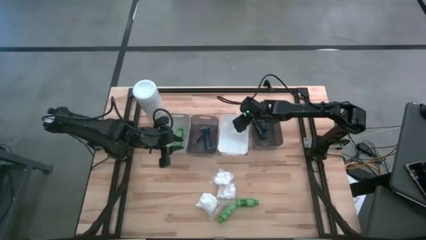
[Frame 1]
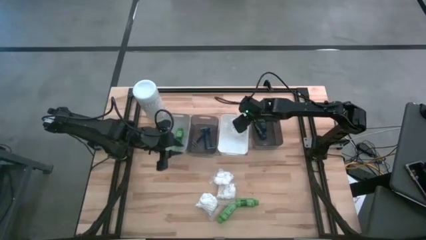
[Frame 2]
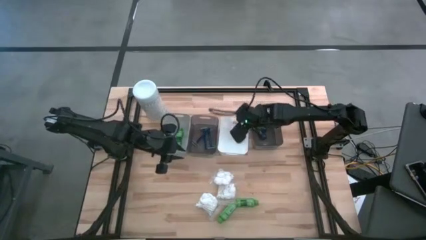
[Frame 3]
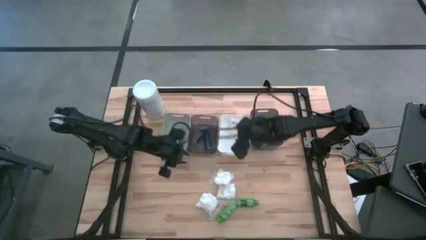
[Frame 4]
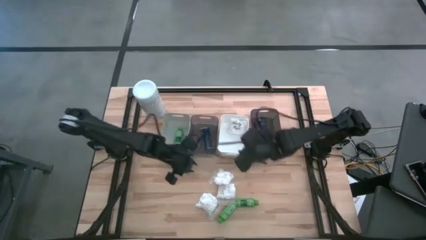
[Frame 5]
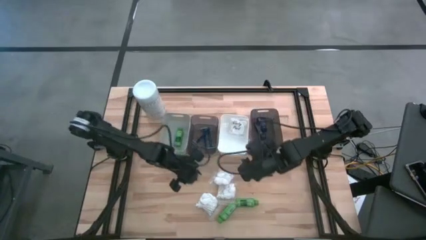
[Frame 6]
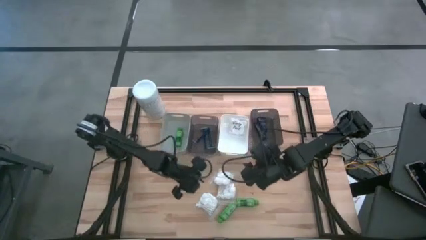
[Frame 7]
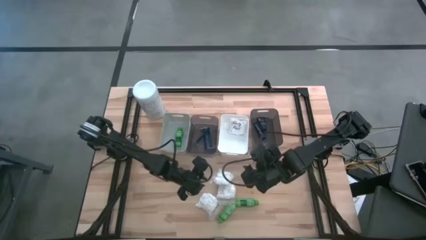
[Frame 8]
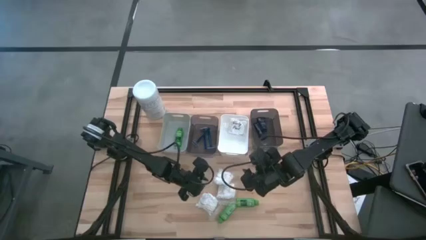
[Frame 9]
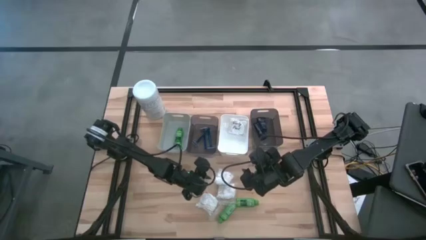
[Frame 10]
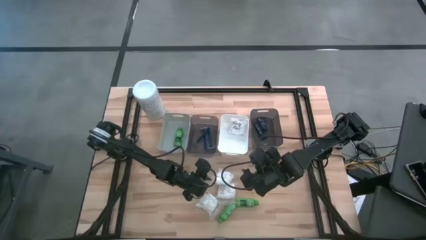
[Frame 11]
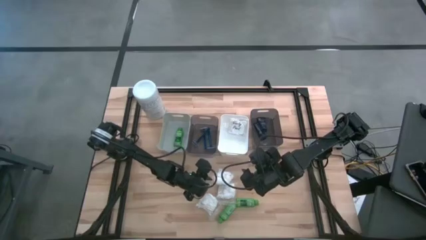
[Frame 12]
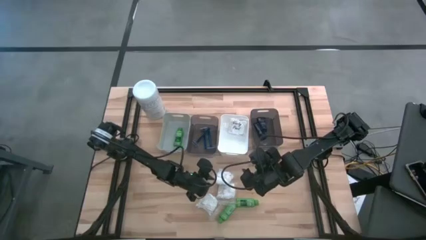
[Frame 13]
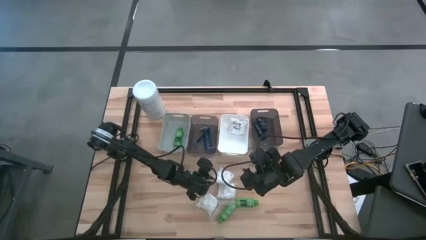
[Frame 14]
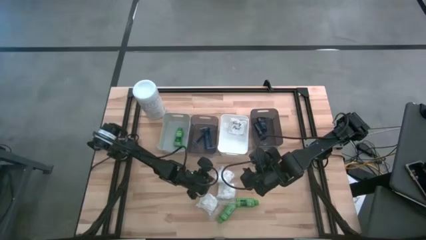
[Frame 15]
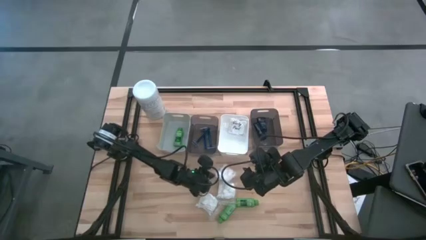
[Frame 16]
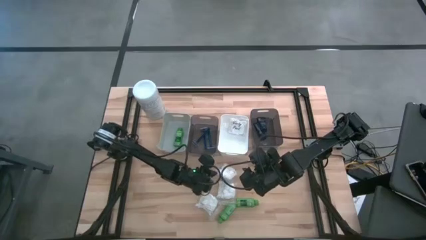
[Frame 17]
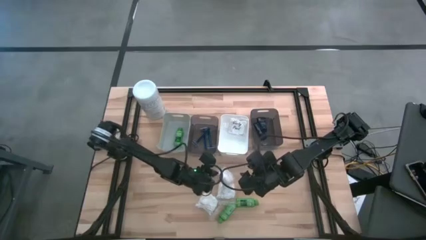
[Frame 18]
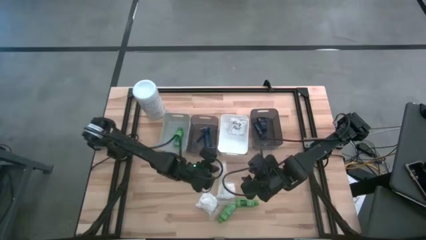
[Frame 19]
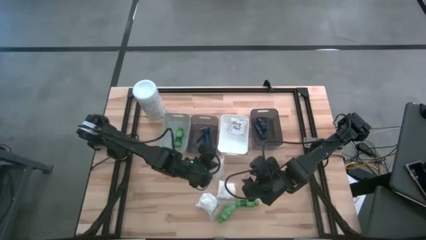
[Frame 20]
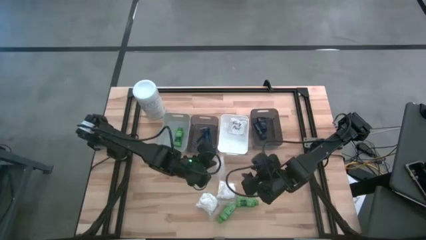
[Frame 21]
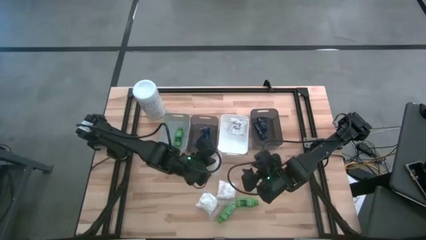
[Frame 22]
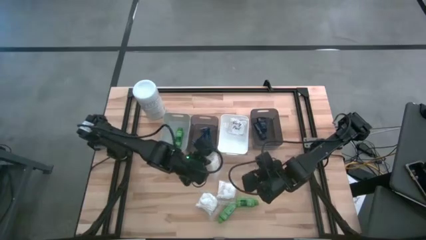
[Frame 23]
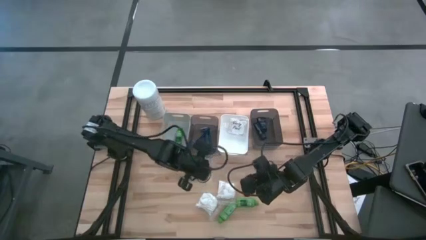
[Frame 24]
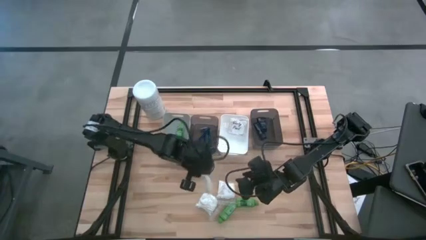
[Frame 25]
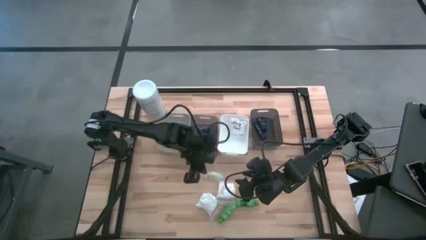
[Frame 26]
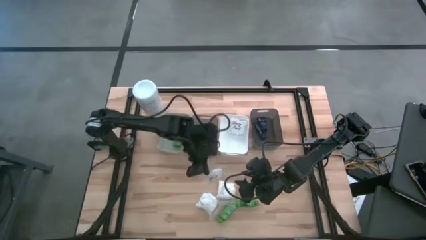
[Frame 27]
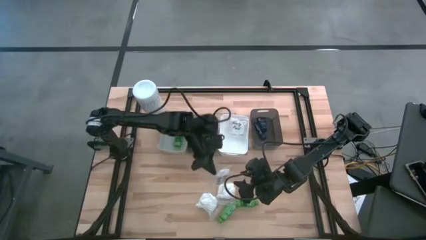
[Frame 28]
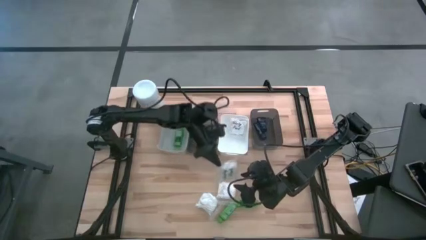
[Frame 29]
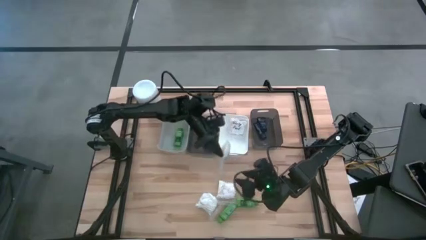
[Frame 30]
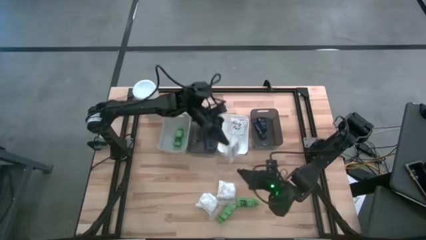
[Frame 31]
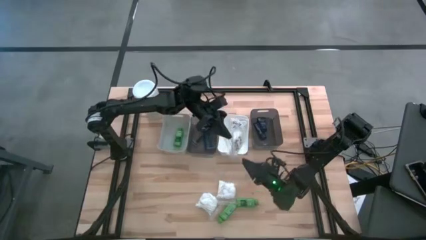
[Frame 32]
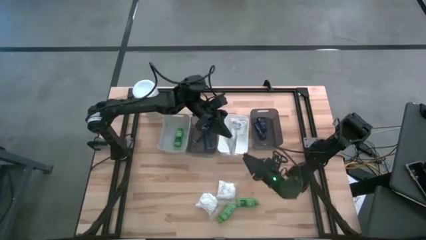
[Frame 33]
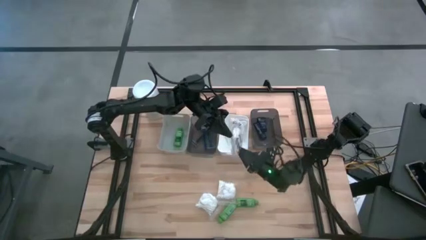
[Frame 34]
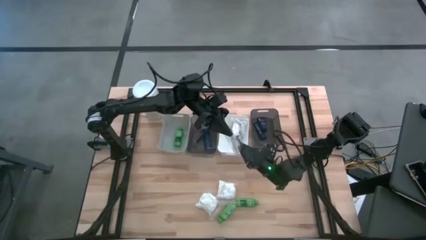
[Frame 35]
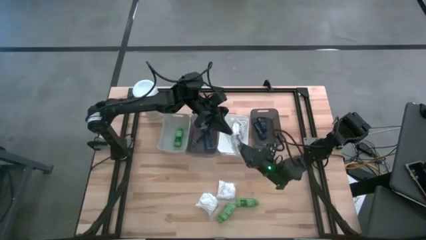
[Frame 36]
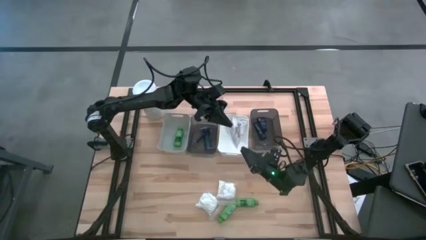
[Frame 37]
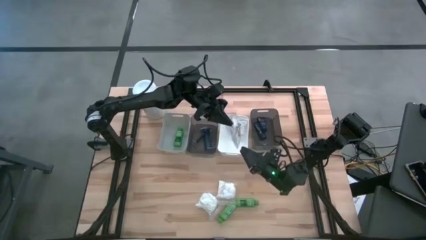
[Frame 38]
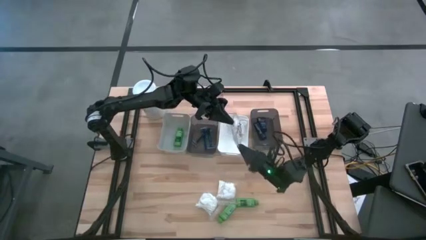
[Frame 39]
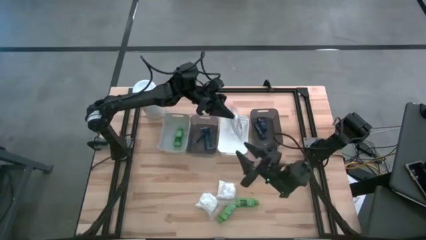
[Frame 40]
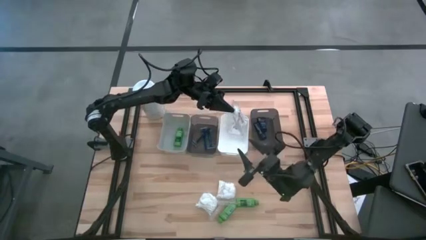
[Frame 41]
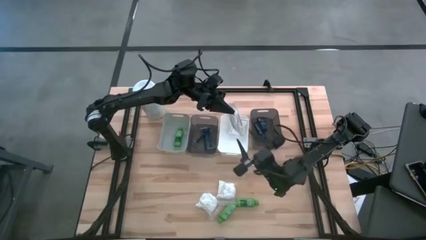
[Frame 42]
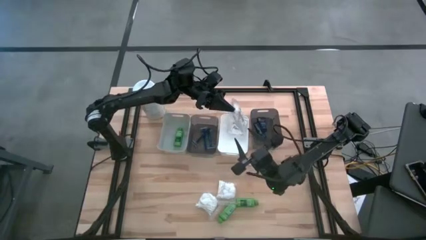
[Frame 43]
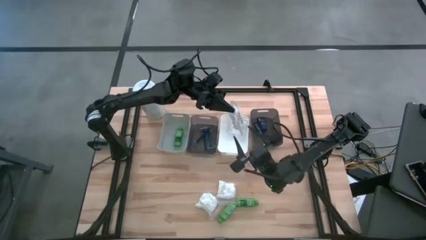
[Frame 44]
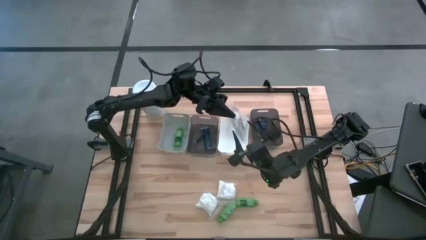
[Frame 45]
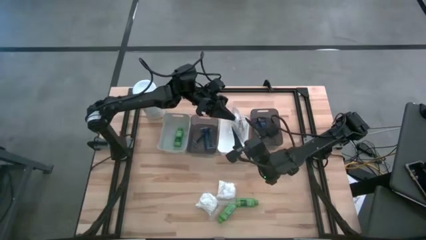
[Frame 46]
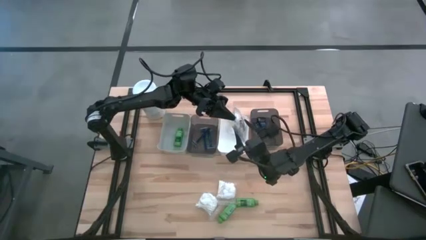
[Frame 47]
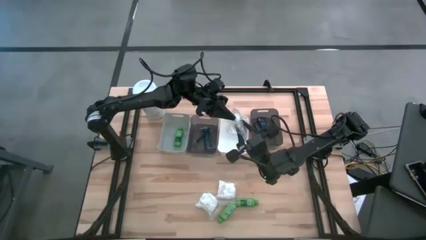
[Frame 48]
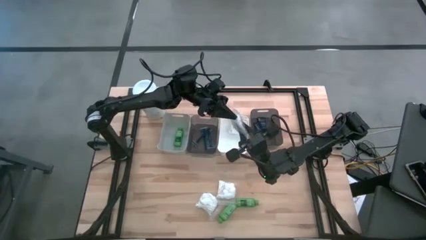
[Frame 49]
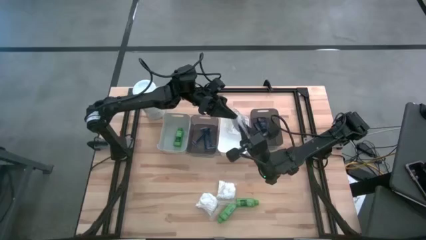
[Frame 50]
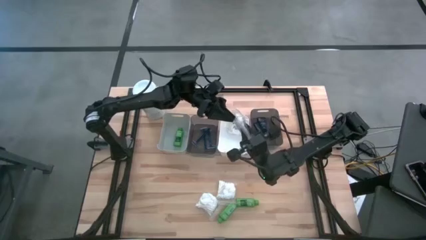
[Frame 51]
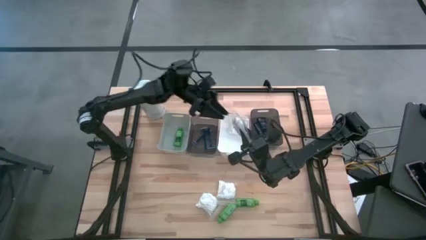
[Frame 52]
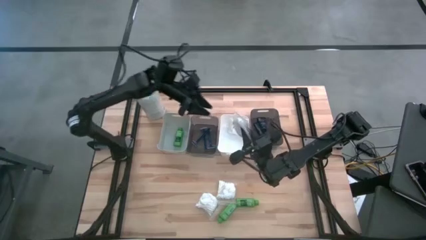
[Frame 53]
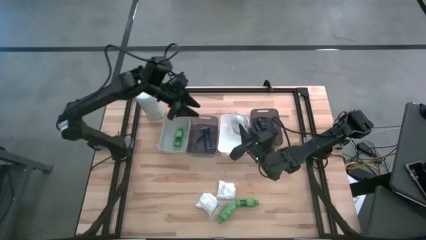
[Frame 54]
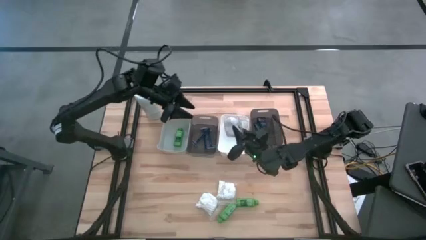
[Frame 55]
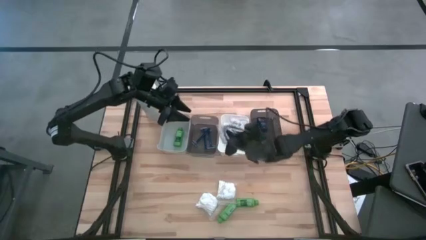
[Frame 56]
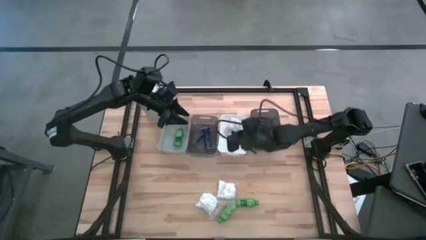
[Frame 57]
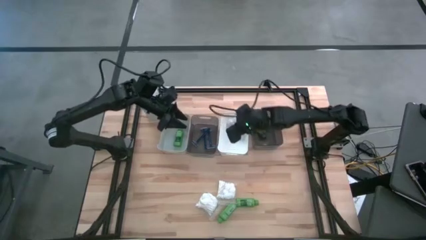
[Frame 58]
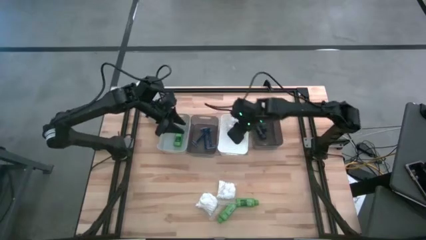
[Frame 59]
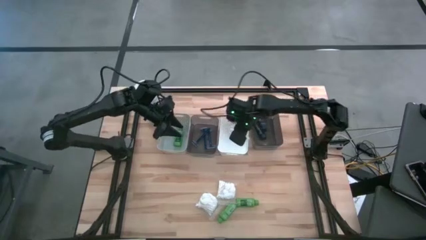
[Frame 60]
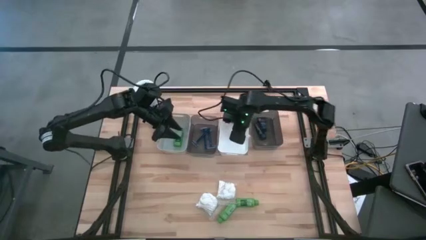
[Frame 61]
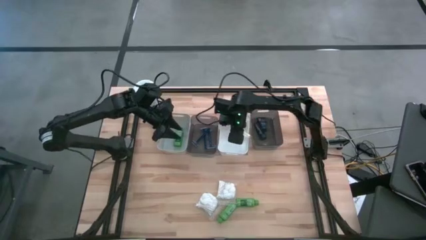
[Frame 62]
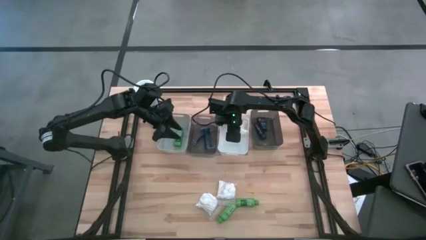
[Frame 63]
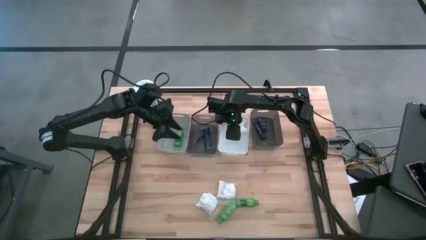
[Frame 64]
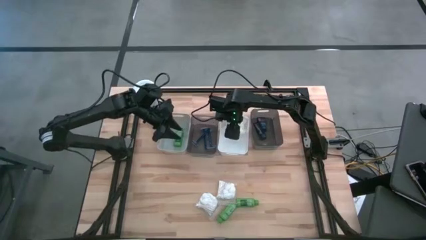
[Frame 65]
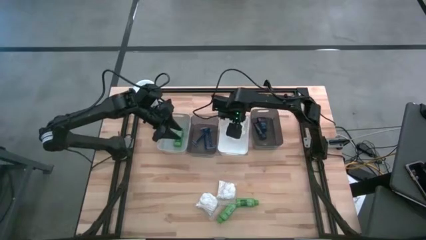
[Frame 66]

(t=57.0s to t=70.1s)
Task: Pick & Place Travel size toiletries
Put the white cotton pack into the white bin

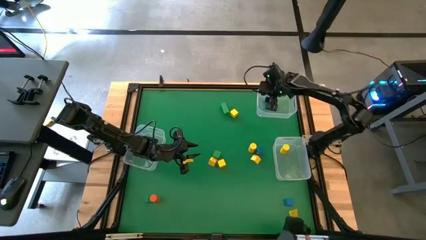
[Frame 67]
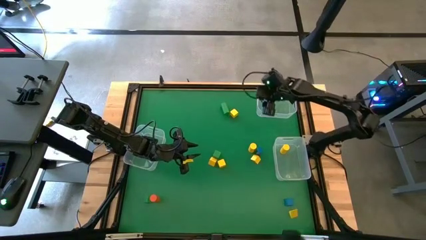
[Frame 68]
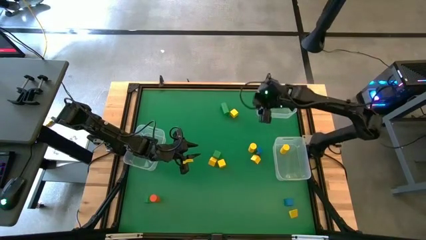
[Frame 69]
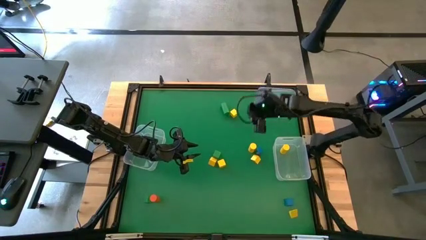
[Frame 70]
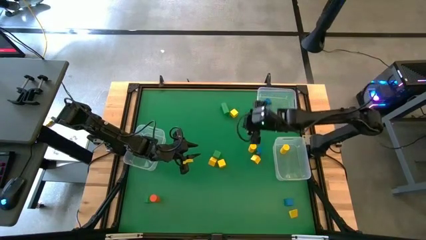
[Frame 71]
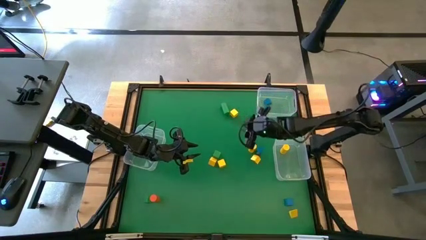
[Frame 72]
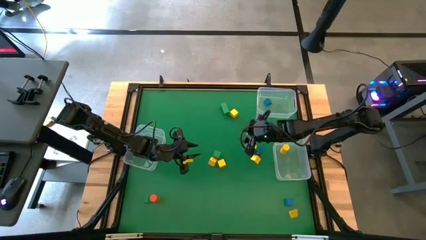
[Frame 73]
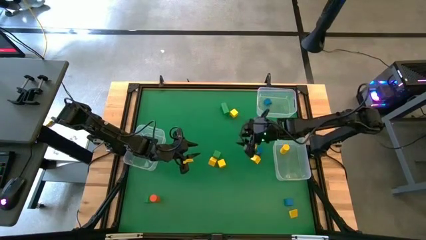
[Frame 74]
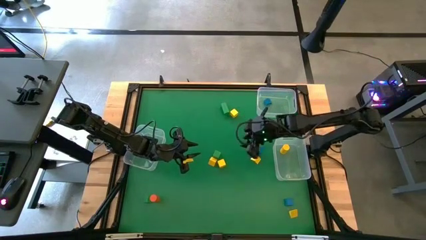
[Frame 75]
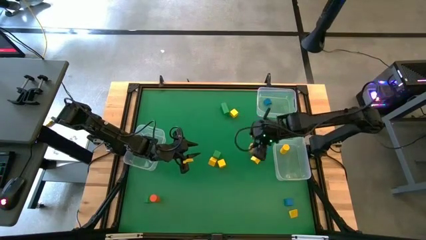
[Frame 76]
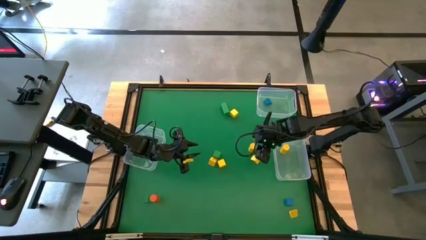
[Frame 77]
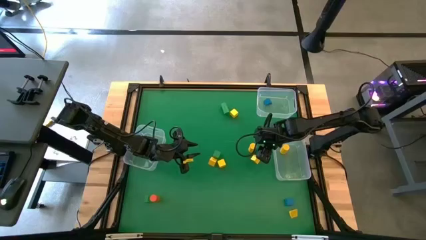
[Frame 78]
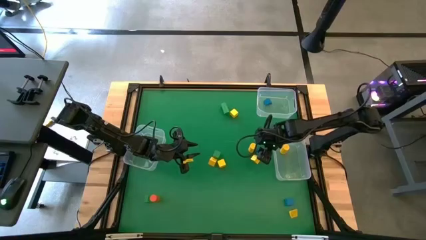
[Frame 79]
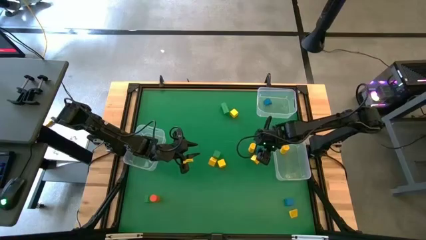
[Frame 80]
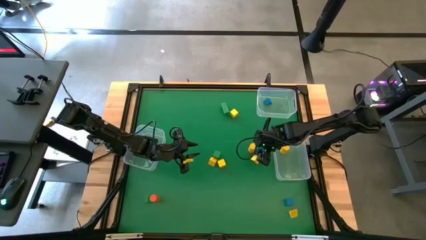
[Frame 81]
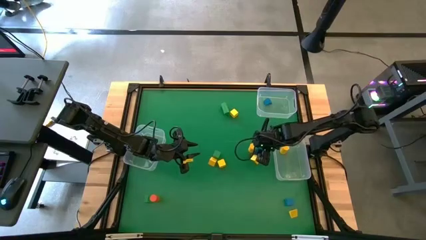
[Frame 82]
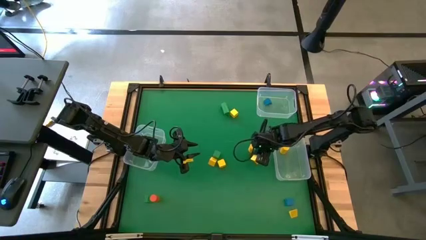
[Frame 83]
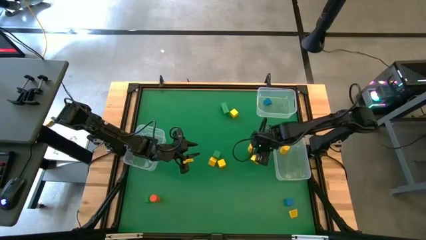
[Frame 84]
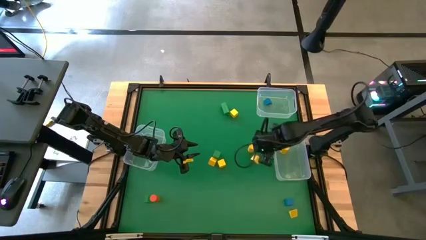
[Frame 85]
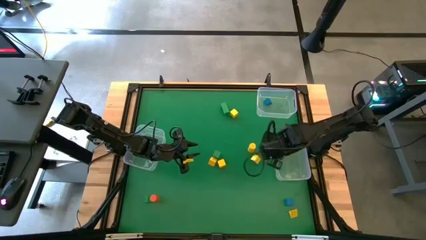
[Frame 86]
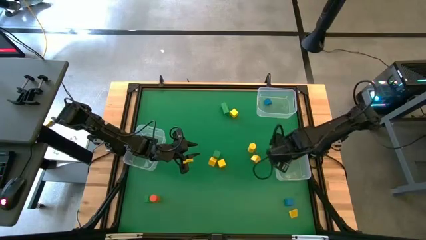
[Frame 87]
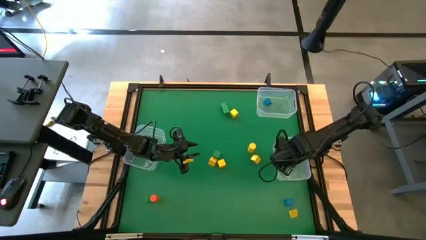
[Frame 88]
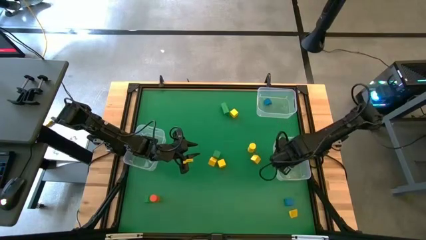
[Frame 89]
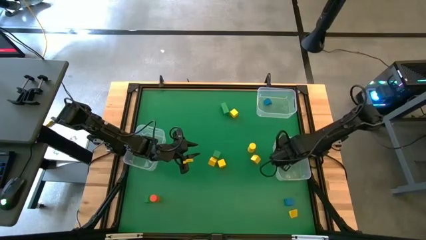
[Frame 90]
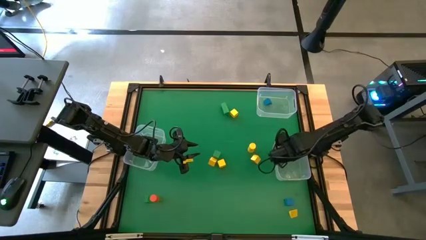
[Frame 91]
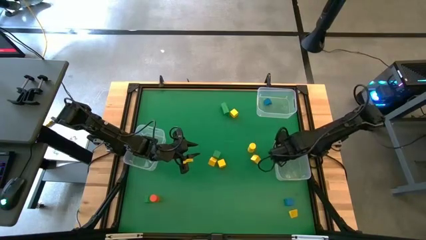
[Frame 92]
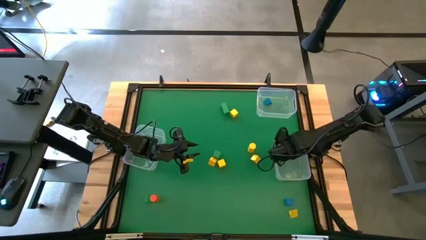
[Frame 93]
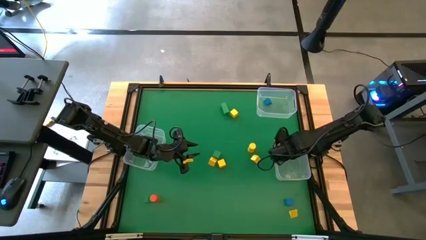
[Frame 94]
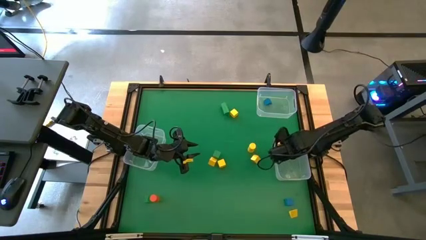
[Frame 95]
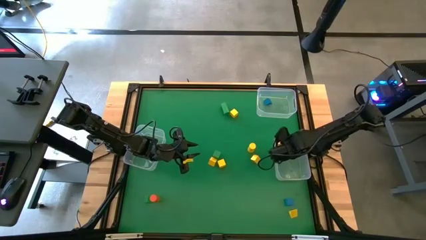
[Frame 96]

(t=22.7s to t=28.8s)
Task: Sort blocks by size
Put the blue cylindrical block into the bottom right transparent bin
